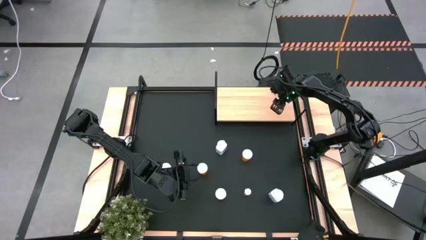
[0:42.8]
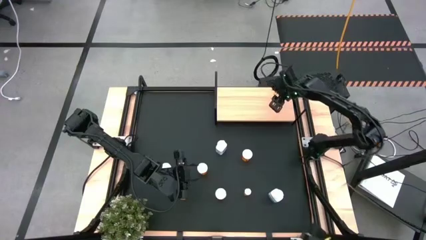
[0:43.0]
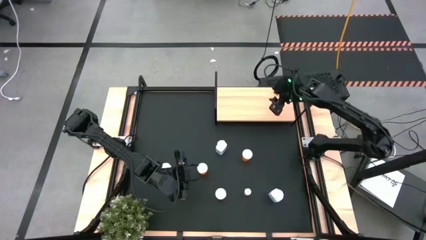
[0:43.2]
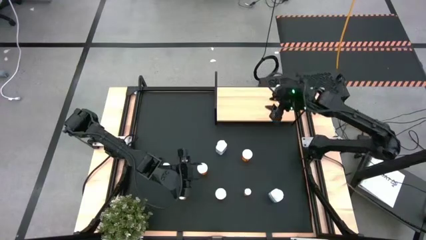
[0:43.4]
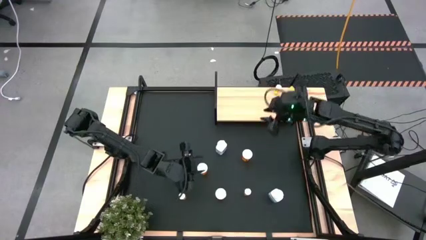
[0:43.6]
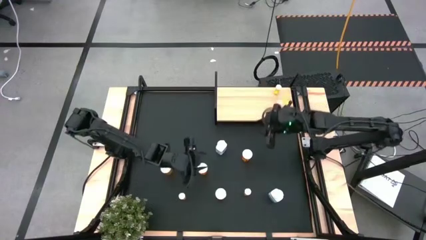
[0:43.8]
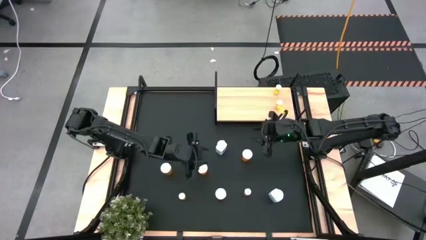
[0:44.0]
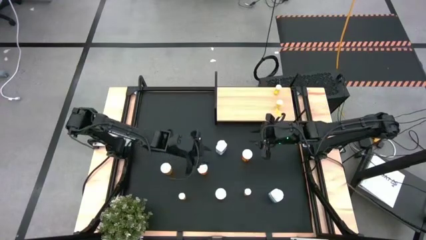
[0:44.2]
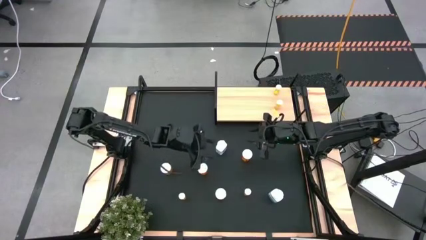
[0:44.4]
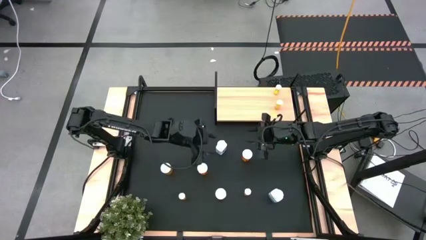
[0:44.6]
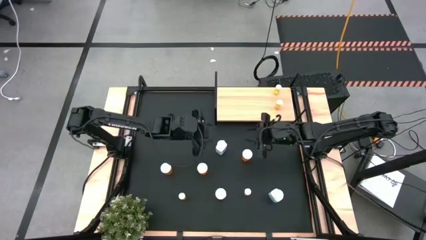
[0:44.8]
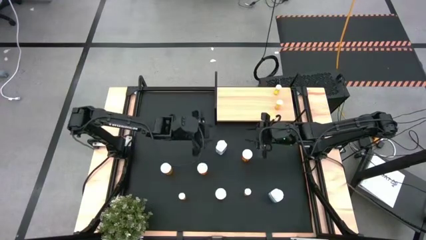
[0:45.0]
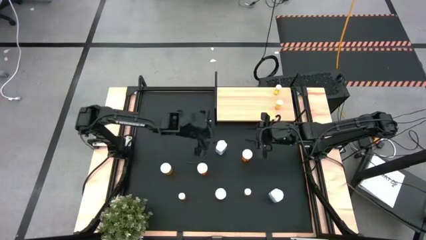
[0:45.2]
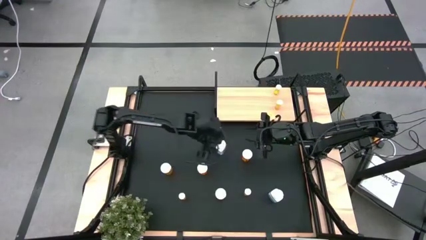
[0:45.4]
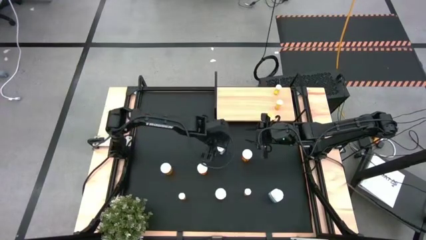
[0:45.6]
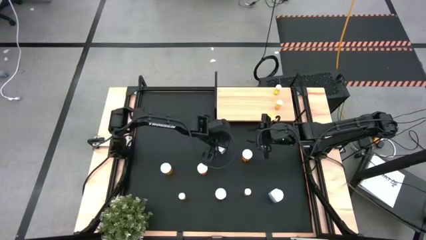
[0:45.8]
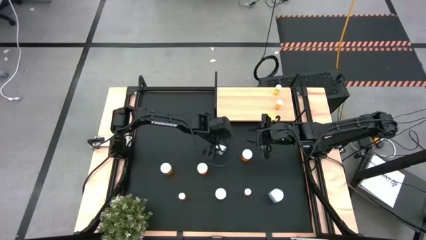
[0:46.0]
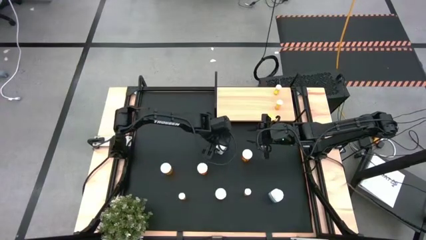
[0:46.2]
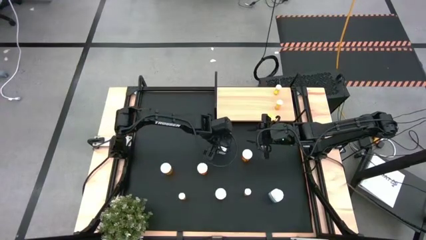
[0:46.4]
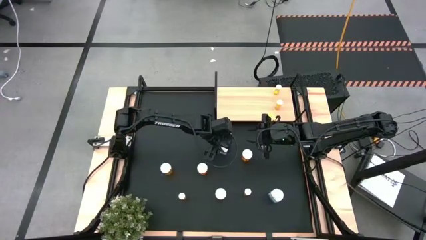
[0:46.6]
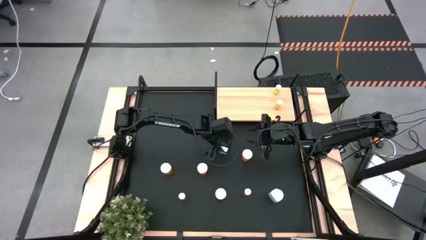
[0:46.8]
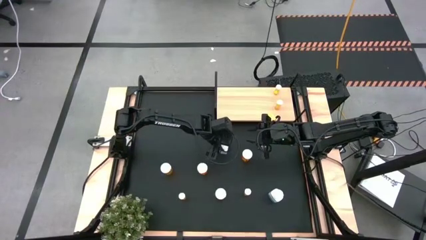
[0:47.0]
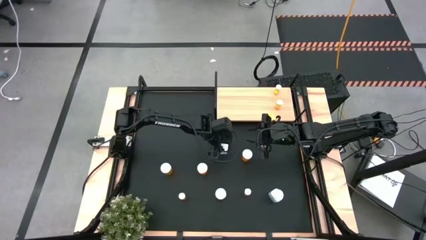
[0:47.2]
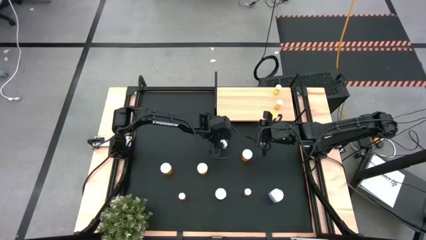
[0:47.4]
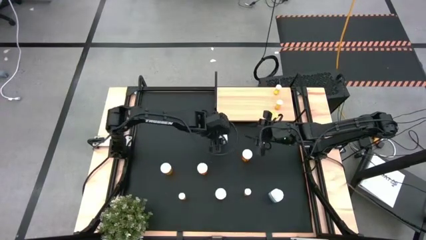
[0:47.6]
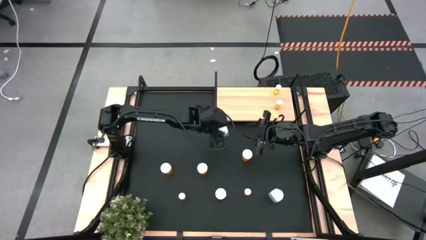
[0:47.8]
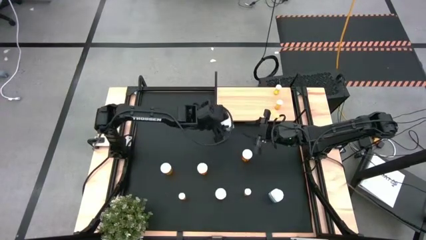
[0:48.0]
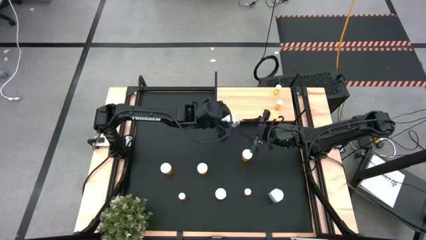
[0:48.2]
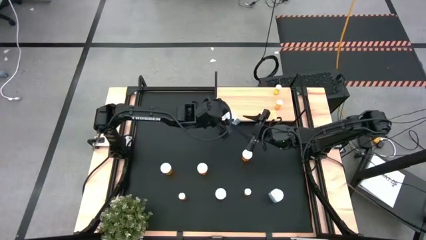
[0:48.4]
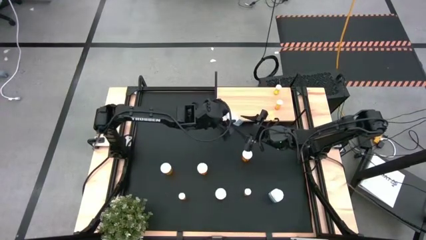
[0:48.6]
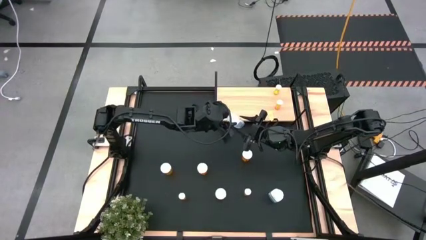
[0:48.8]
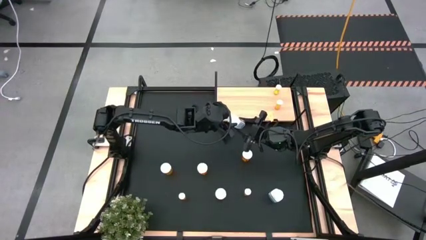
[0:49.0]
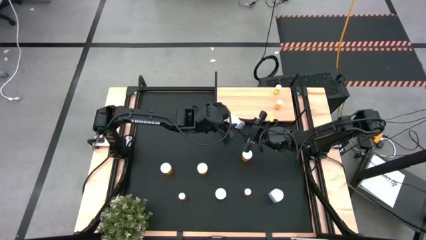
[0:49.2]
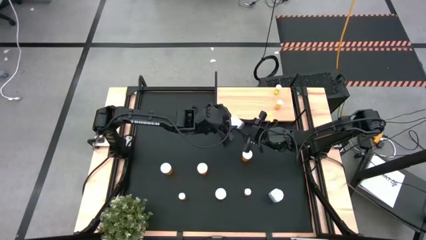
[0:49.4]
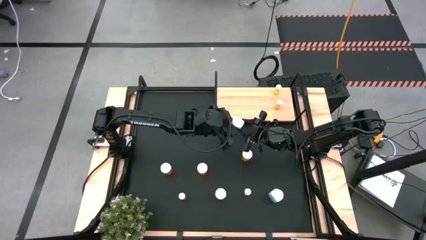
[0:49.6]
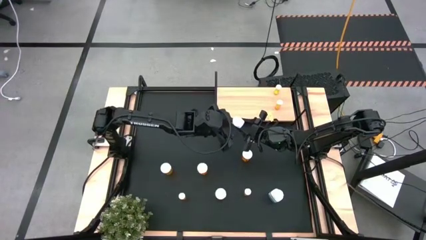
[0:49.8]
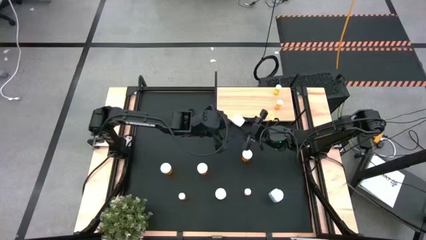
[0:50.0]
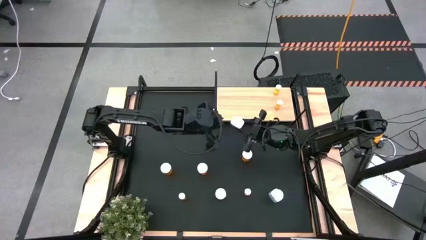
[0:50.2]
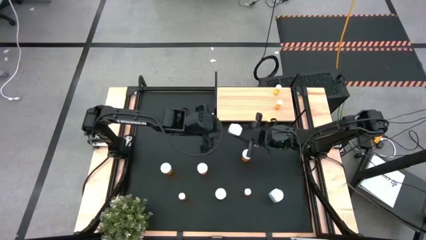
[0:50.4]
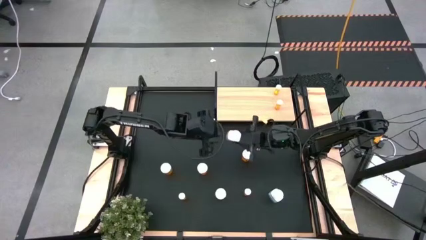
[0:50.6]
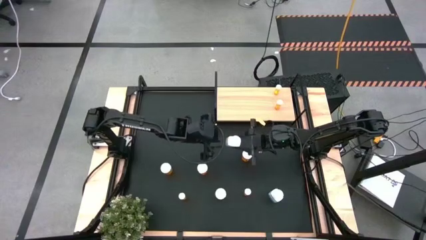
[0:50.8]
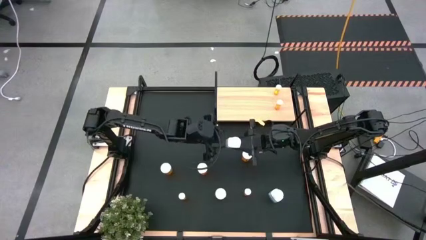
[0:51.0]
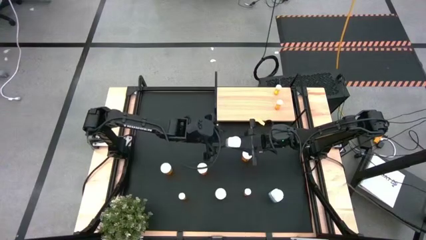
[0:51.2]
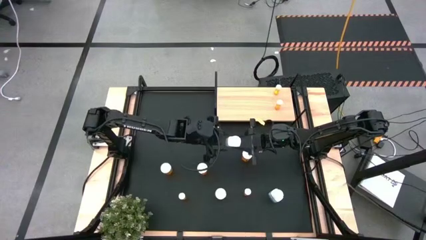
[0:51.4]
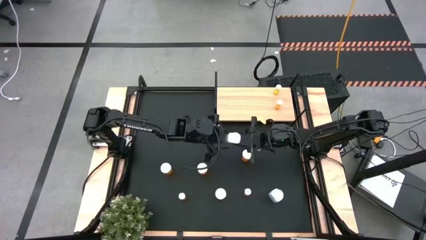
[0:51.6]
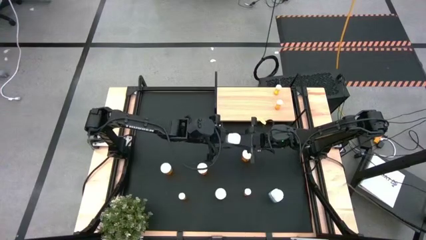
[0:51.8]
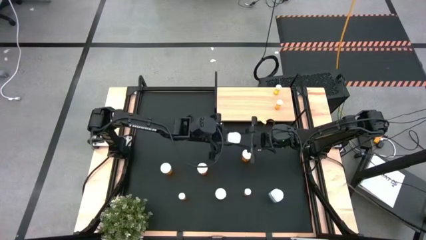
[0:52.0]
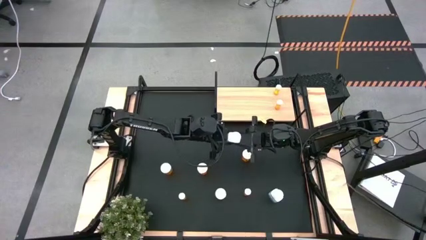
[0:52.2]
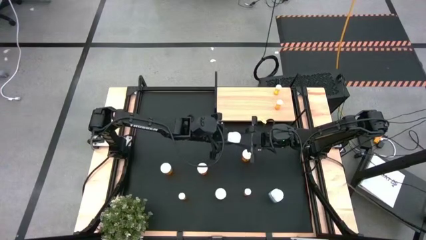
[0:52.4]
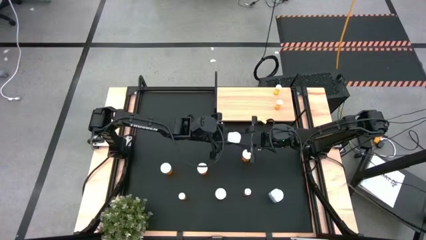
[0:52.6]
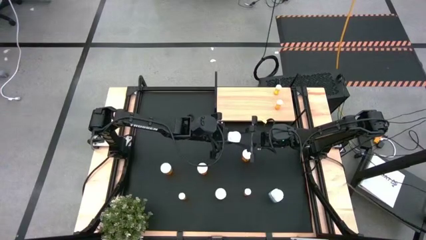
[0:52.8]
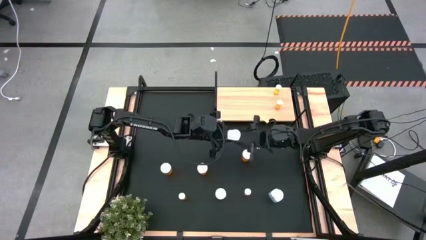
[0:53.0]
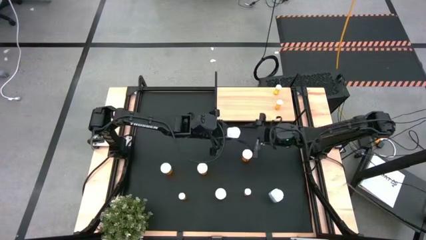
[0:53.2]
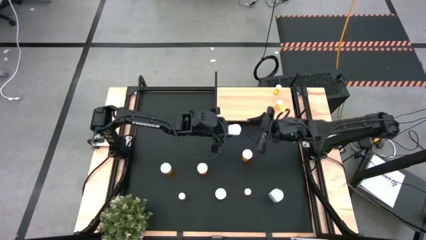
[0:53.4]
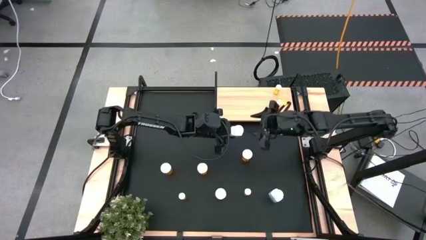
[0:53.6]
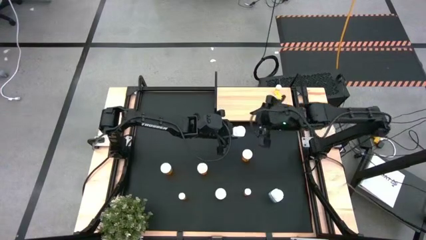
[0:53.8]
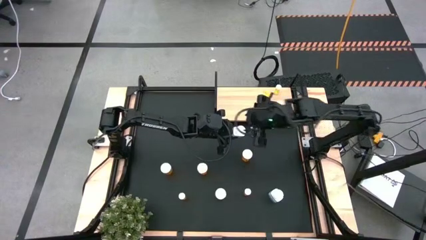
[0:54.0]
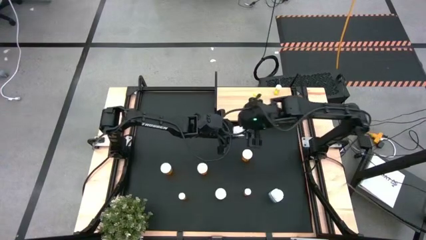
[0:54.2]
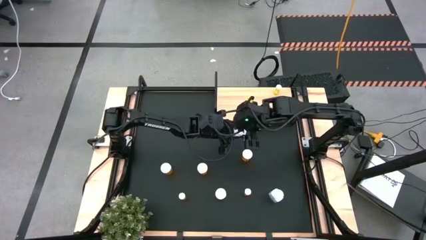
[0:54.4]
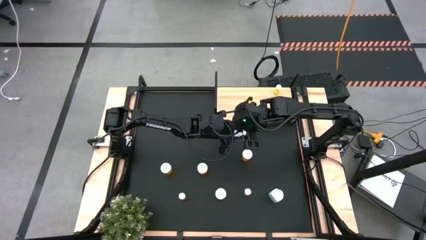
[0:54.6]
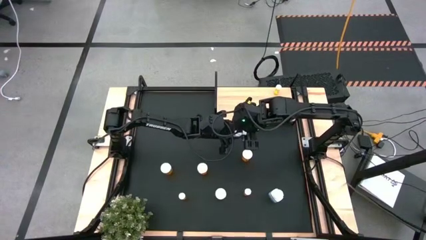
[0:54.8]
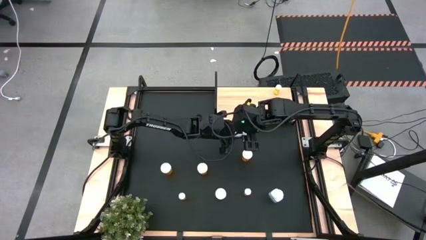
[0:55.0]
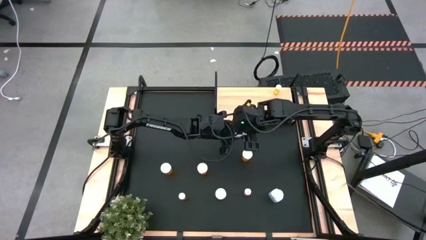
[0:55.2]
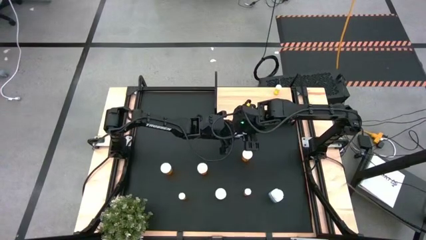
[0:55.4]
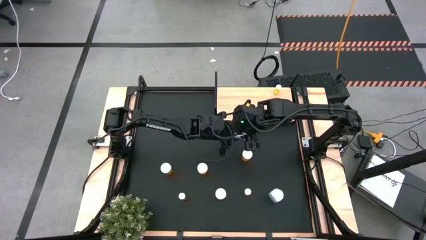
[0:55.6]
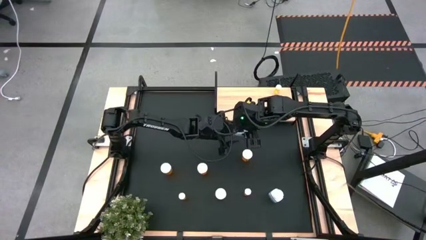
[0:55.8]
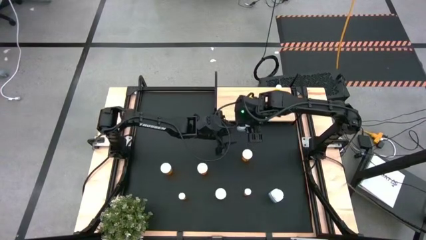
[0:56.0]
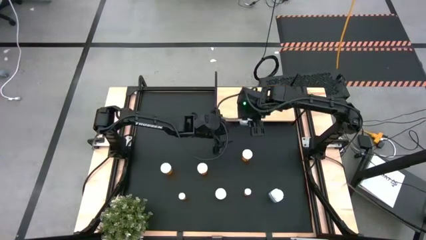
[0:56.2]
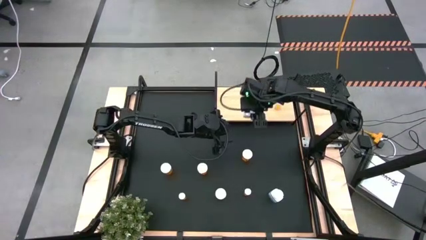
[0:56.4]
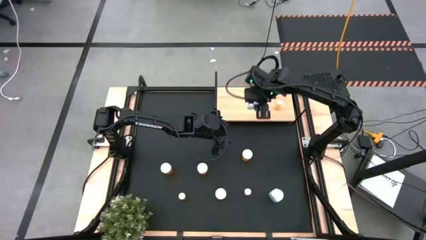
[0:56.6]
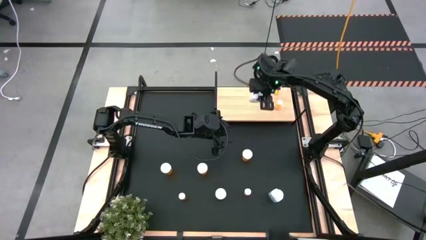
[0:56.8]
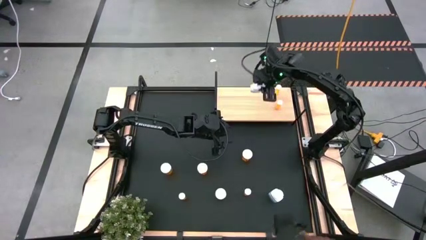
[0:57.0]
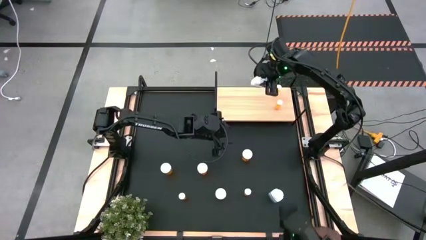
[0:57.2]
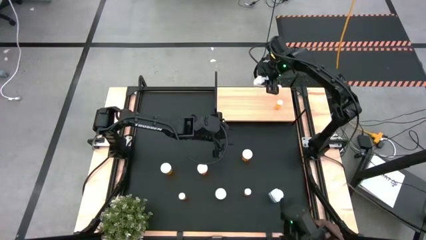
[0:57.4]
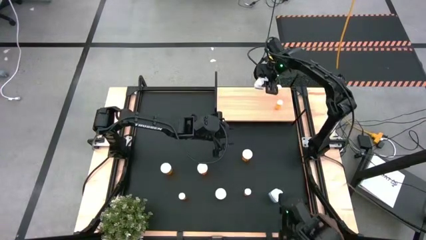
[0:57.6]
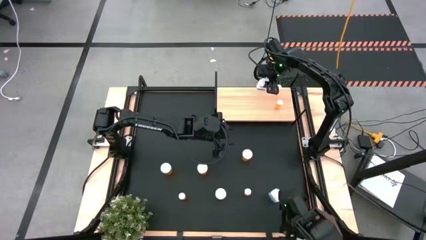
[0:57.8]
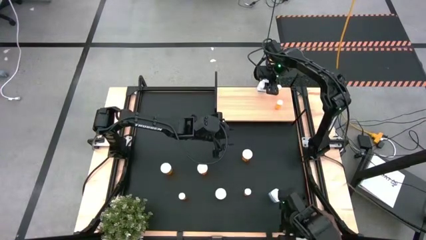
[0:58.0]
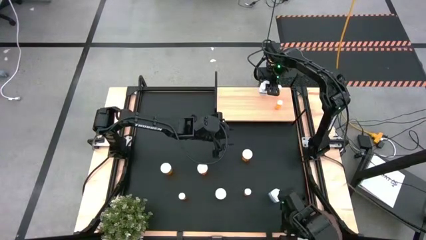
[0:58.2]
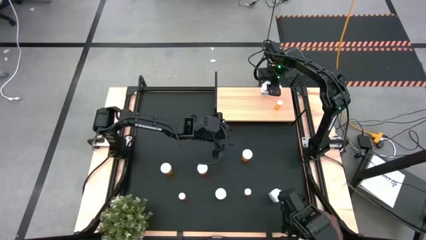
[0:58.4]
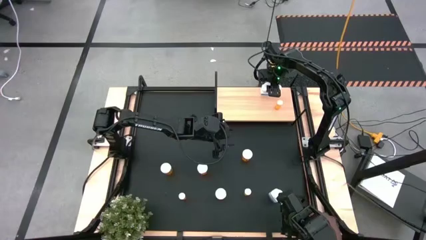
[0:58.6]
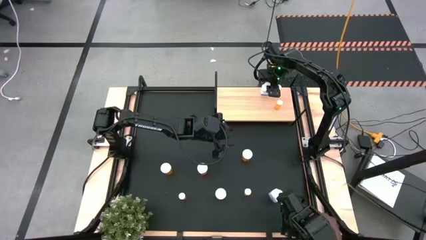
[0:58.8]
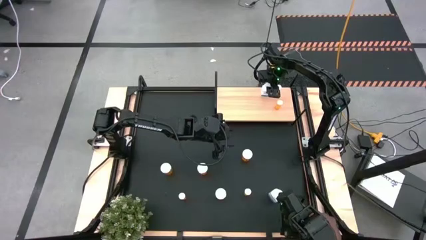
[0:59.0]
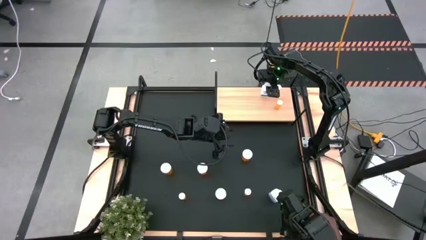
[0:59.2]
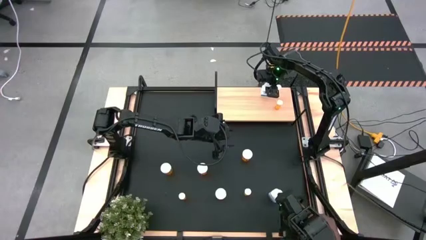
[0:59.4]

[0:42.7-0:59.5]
Task: Pick and place medicine bottles onto shelf by color
Put the white pill bottle on the shelf
